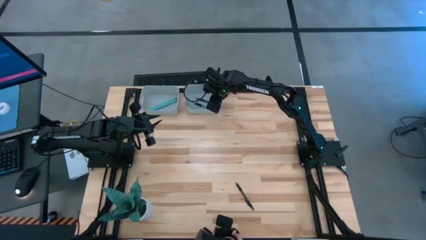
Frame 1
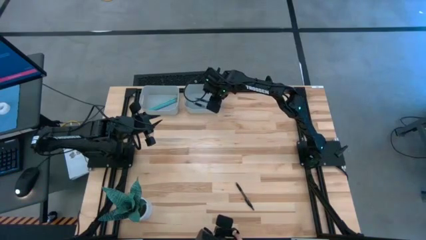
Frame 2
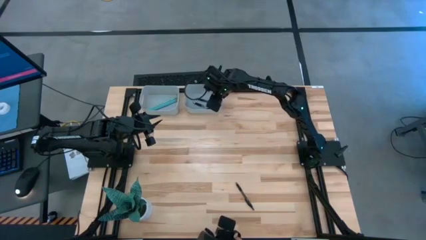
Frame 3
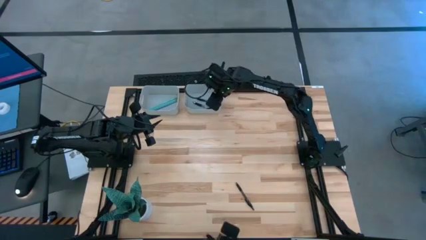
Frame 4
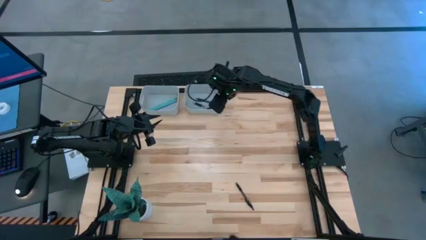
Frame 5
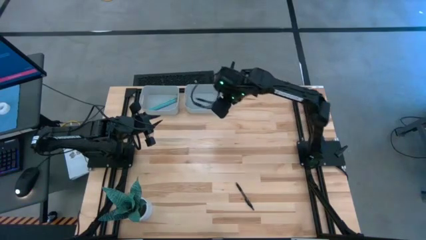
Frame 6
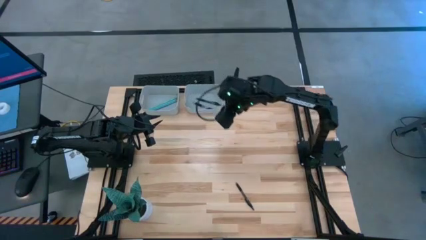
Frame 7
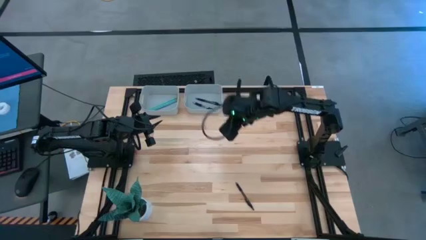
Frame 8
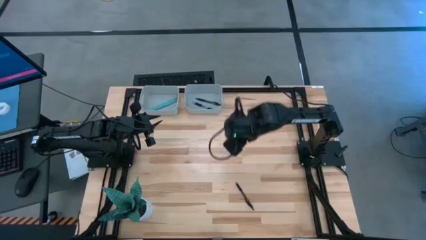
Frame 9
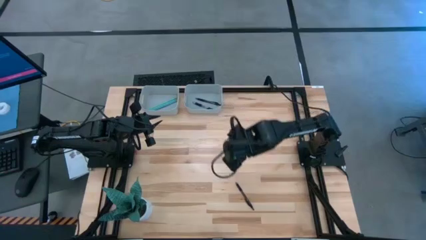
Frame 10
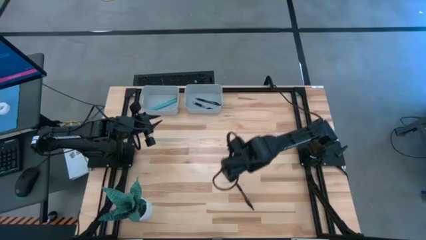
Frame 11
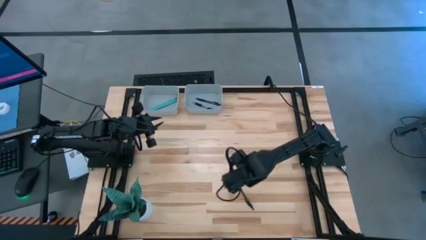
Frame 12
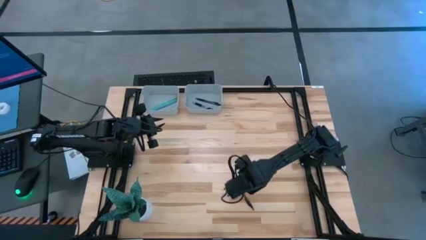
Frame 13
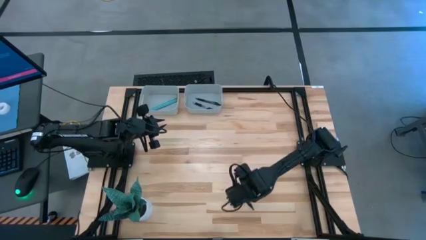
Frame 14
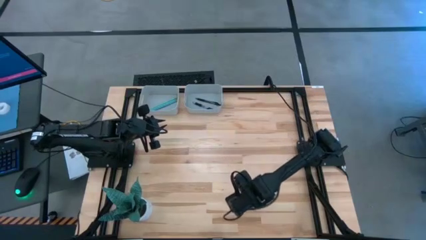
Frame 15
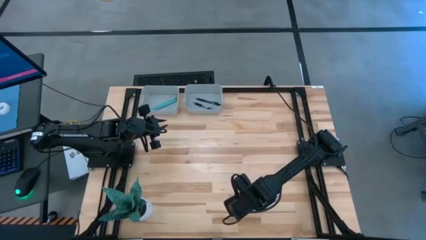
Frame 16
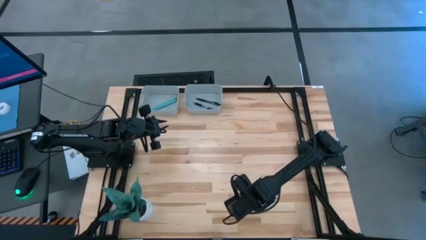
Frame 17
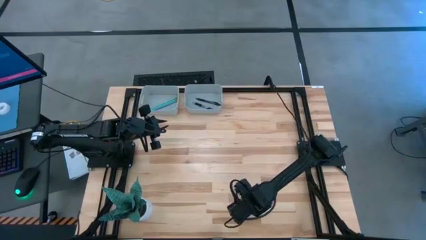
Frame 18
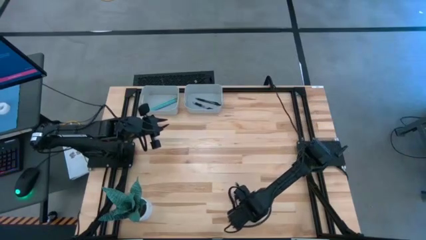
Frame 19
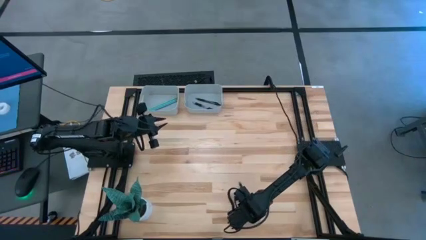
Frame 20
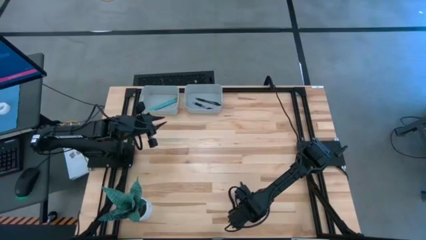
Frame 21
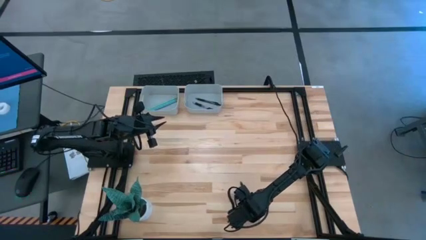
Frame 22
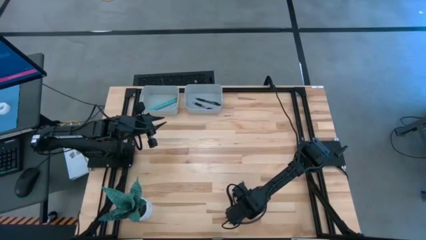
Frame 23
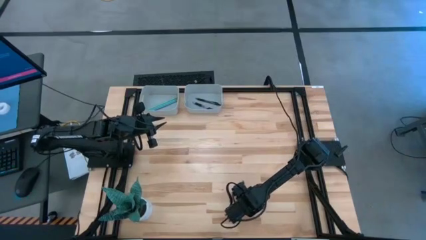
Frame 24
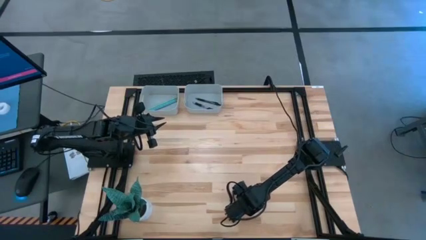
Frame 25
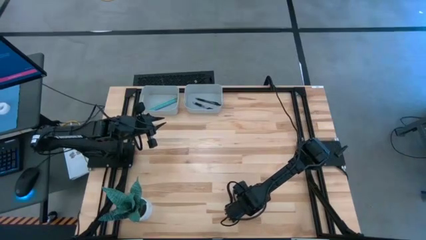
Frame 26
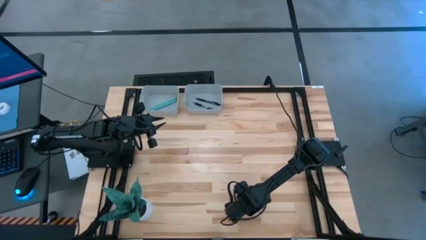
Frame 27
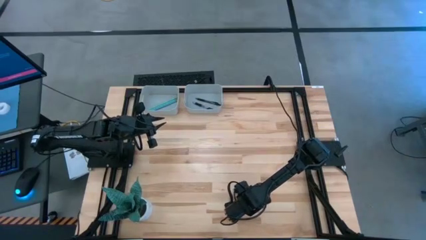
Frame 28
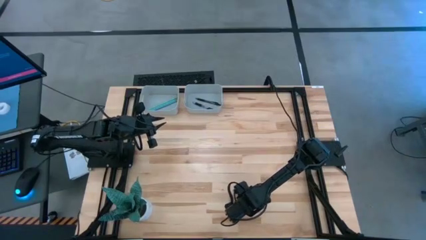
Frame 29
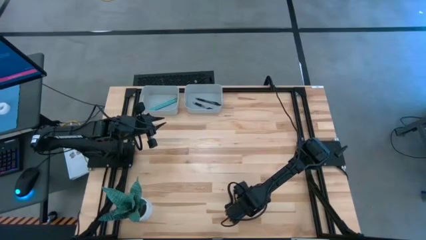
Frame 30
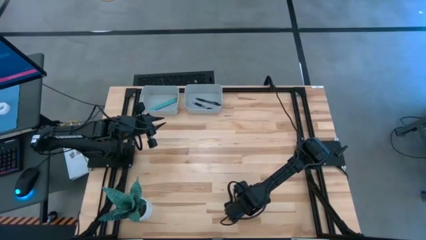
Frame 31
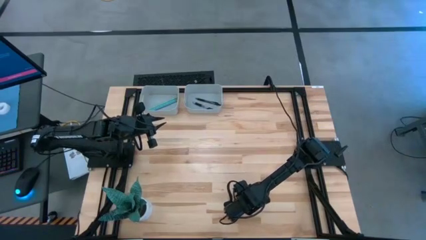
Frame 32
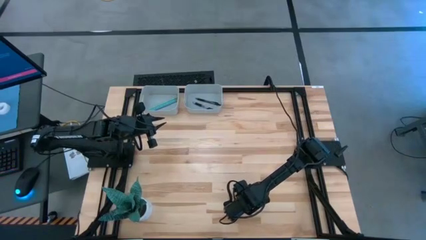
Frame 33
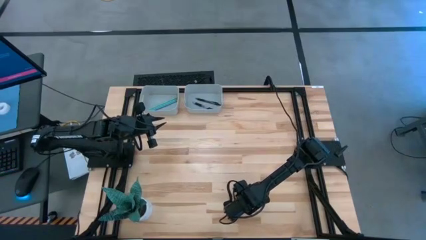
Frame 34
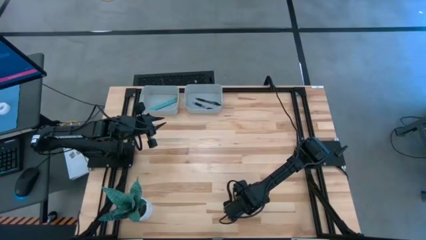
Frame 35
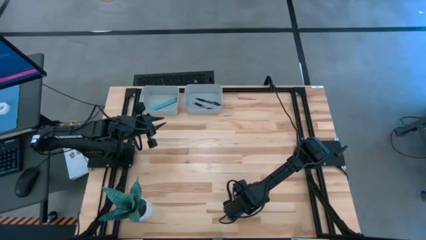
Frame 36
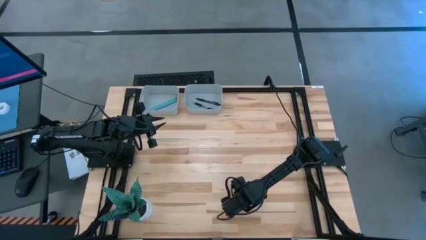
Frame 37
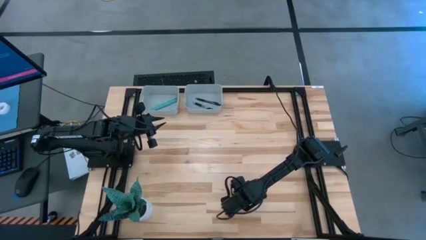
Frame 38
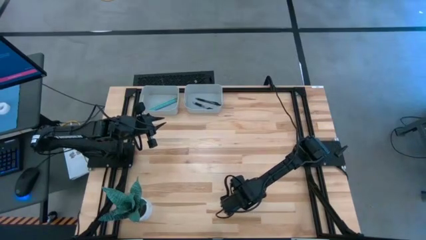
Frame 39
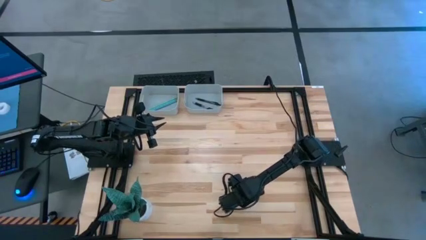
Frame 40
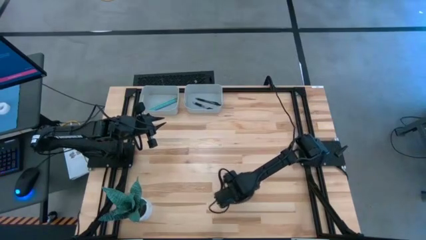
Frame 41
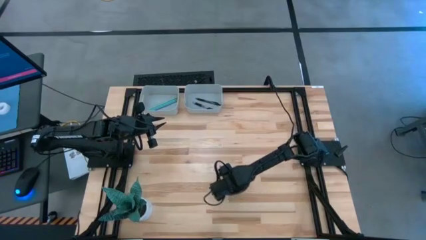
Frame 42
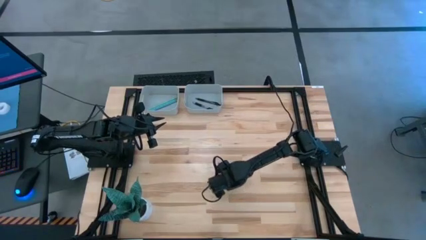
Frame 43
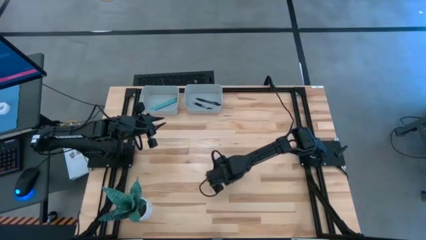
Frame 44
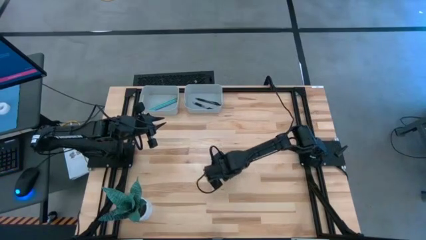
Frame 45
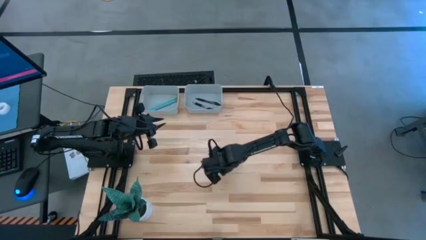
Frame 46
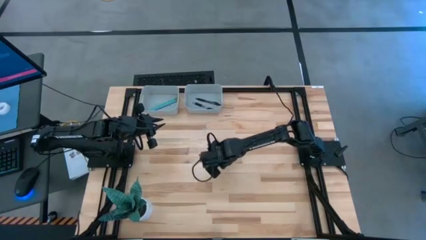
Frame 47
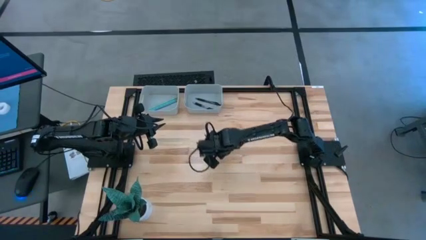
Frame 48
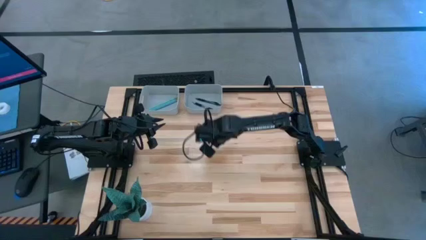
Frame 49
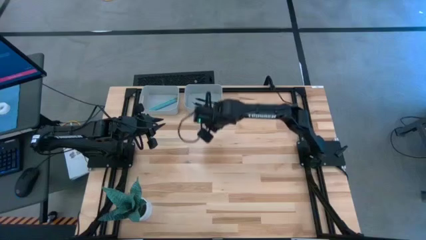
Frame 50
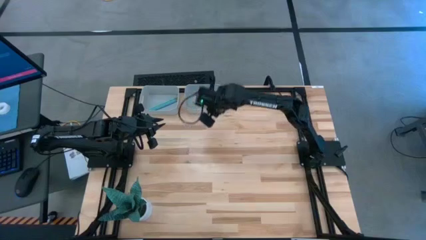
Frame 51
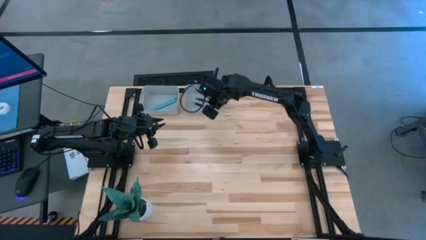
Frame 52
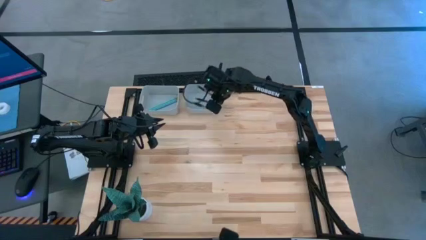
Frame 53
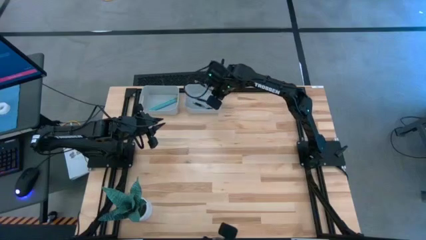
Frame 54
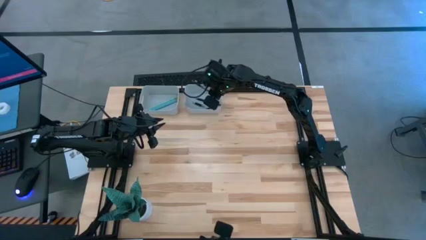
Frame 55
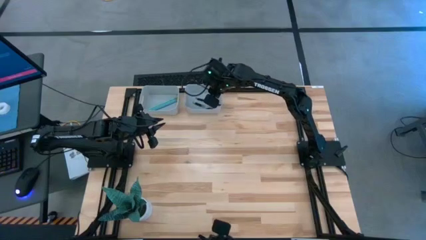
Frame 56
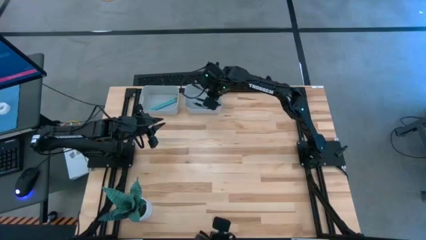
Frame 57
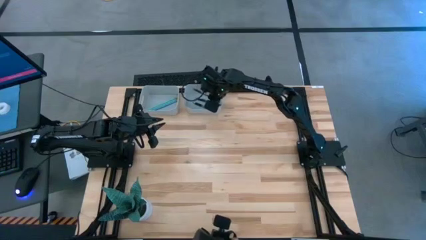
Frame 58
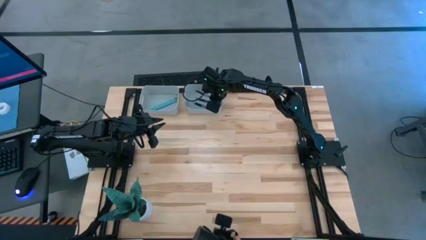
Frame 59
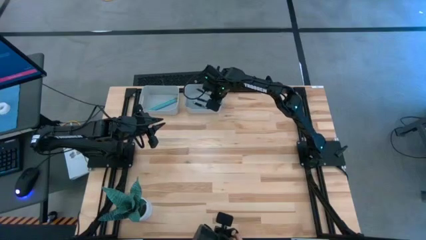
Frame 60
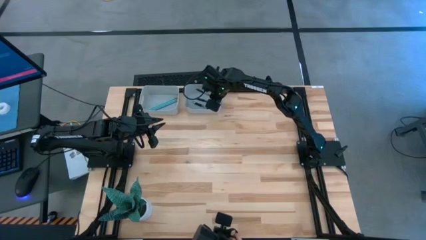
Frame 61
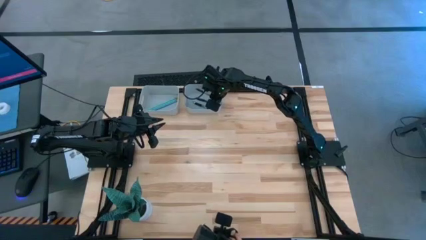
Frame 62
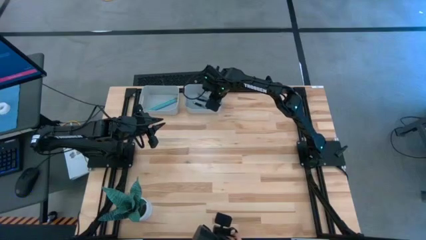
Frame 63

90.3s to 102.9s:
Task: Sort pens & pencils
Put the black pen into the right gray bin

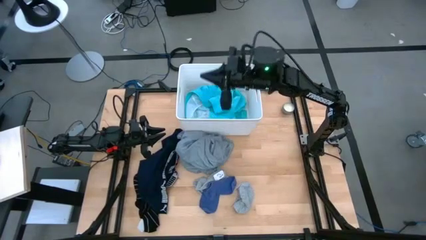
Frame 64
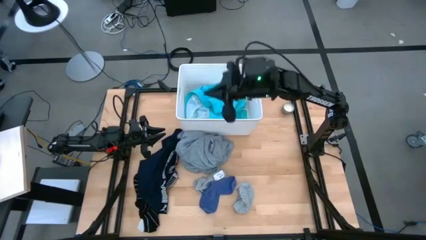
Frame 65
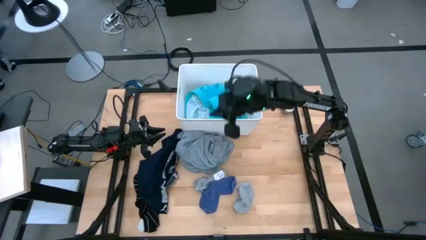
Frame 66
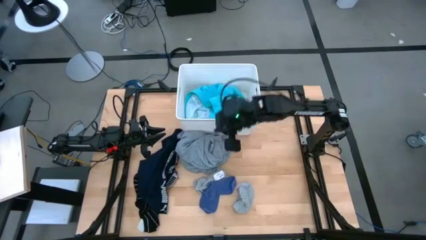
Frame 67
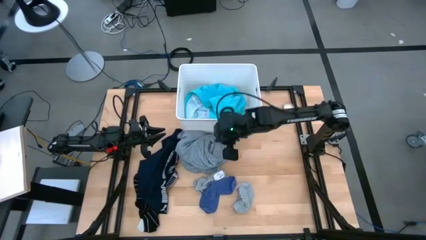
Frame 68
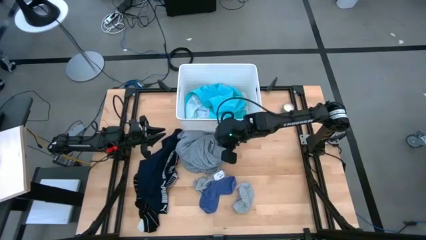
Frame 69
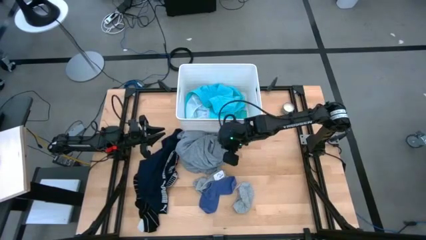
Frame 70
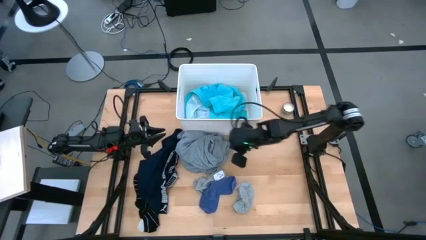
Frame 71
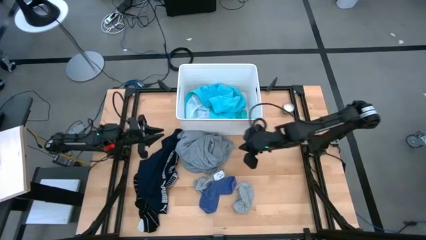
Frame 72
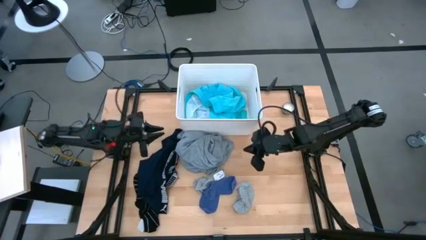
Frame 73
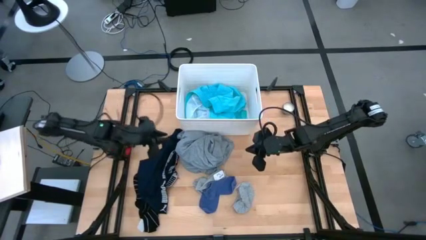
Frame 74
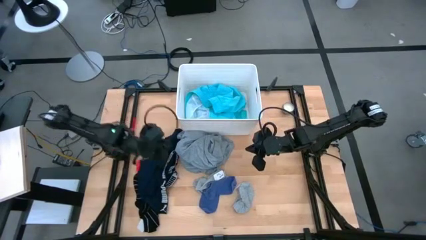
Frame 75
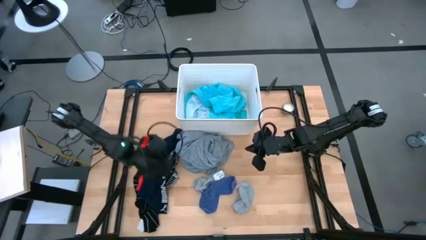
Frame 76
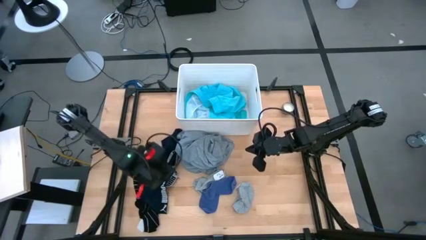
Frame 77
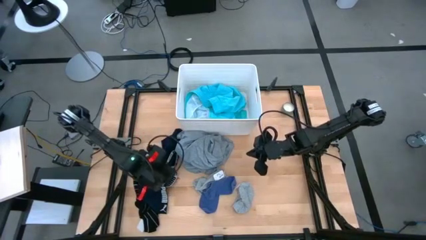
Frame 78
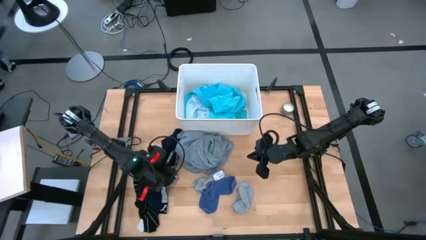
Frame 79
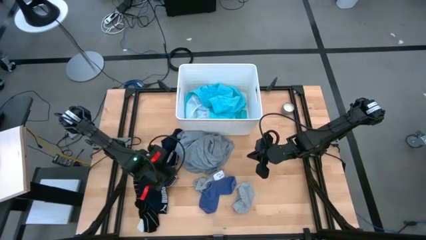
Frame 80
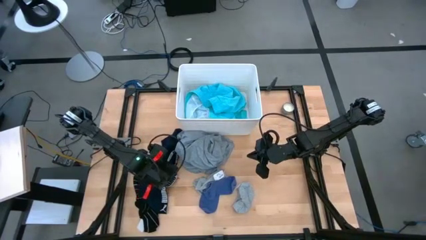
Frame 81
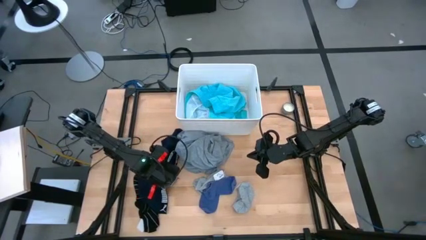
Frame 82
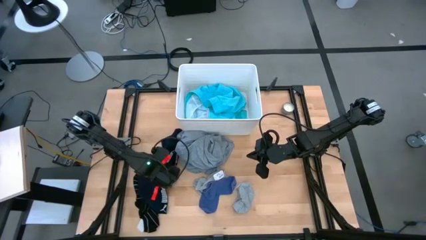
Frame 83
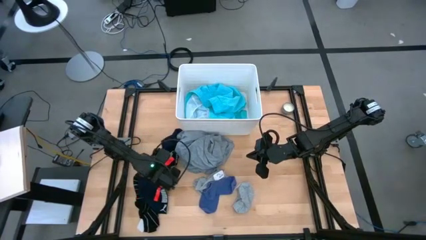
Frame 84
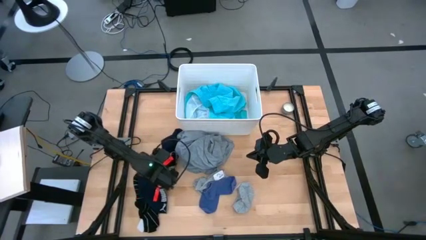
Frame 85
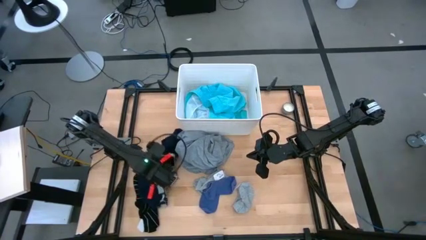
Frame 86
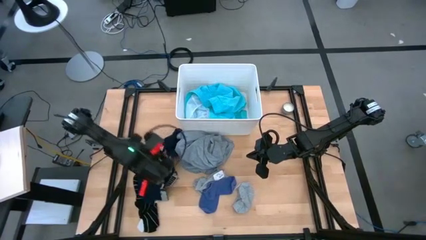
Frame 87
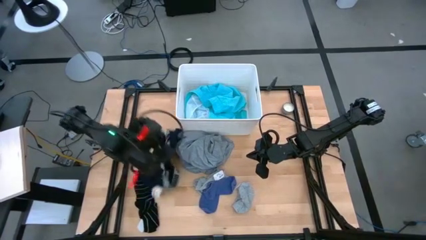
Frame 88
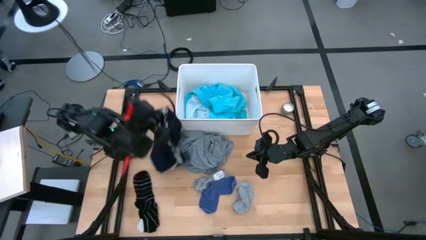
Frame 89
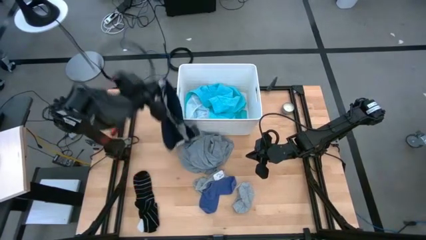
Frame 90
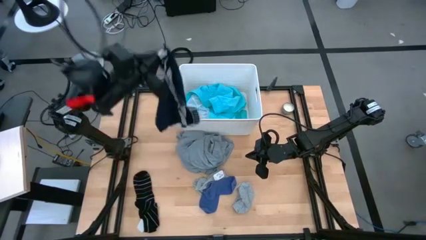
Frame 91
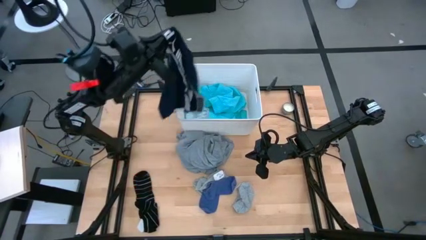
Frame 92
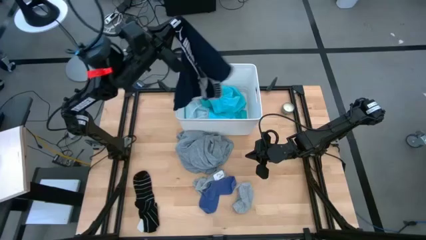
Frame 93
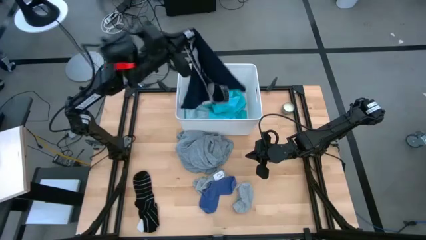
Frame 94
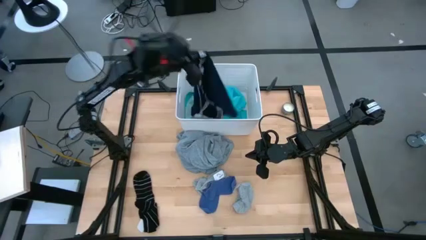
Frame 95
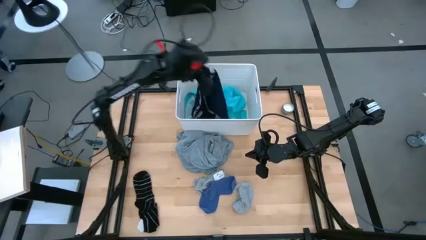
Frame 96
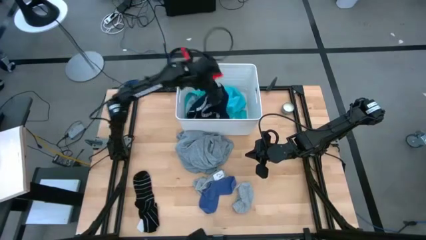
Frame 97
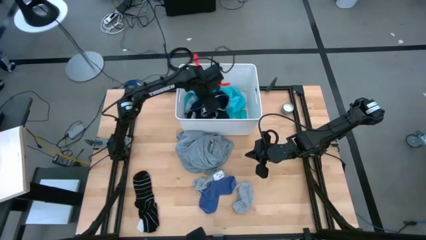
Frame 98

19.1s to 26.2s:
Task: Sort clothes
Put the dark blue boxer into the white laundry bin
